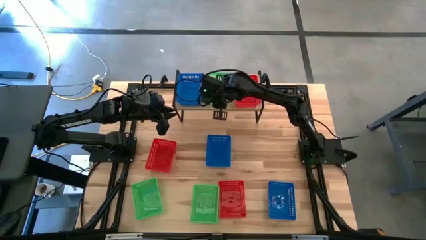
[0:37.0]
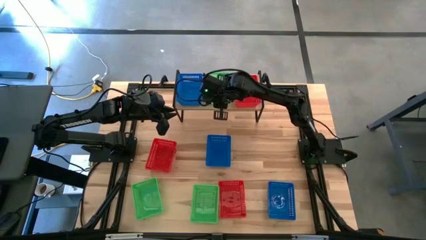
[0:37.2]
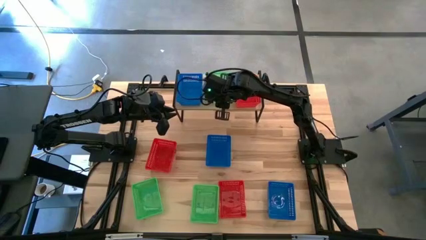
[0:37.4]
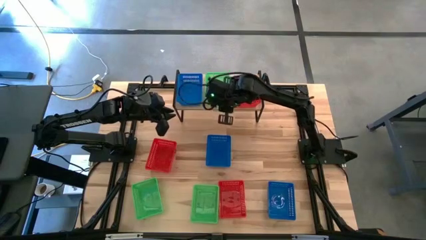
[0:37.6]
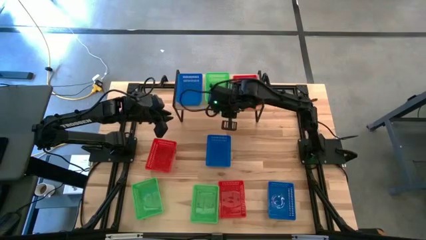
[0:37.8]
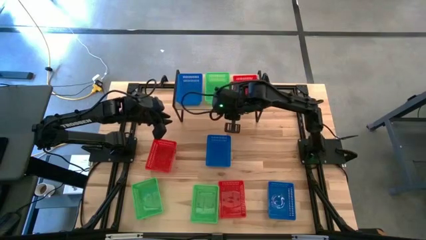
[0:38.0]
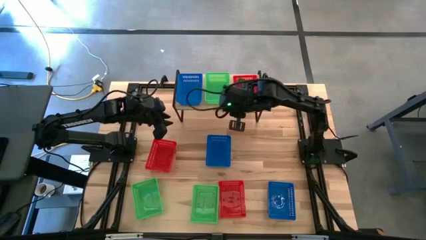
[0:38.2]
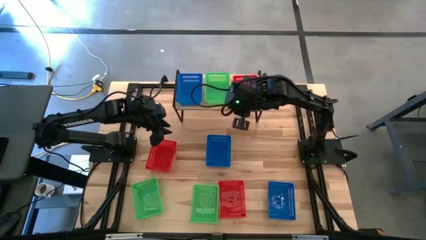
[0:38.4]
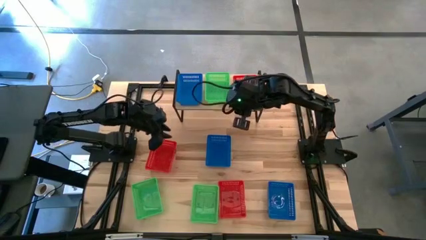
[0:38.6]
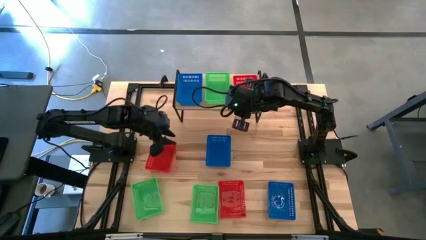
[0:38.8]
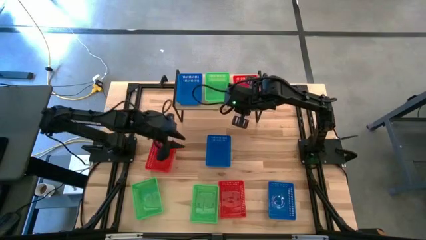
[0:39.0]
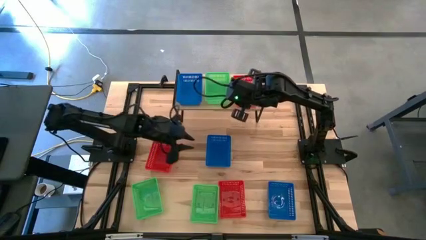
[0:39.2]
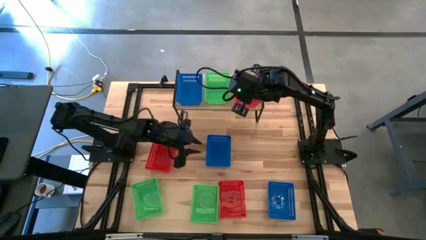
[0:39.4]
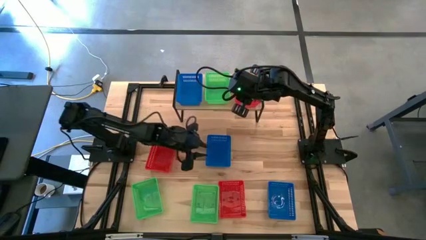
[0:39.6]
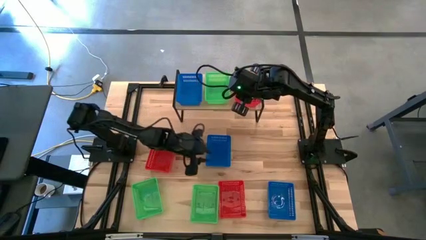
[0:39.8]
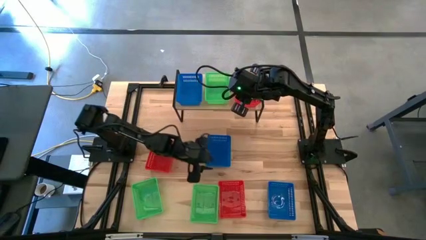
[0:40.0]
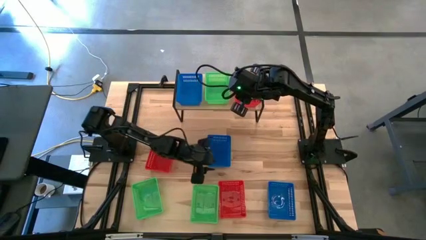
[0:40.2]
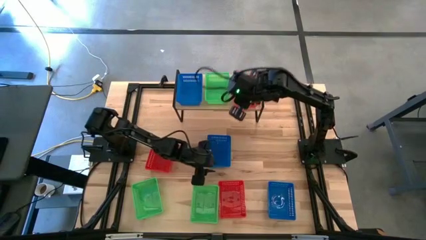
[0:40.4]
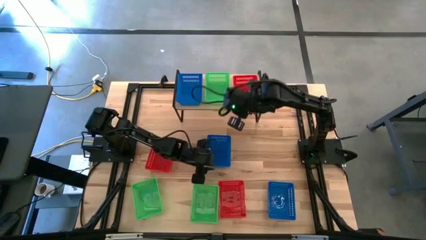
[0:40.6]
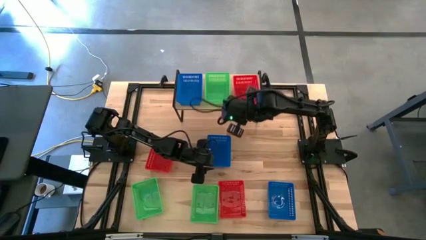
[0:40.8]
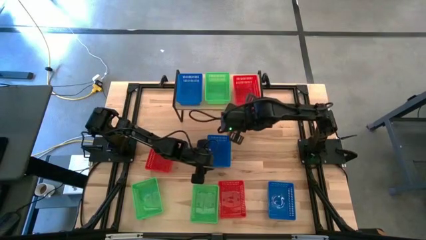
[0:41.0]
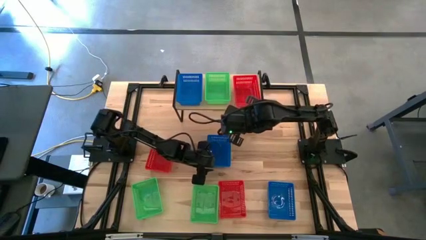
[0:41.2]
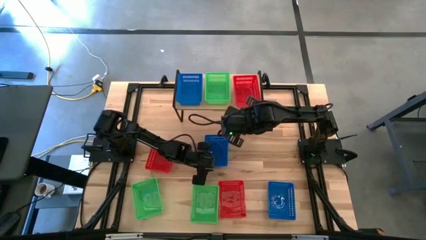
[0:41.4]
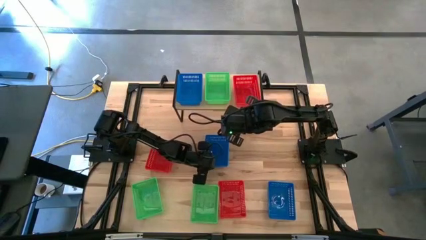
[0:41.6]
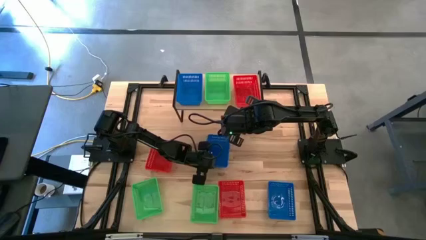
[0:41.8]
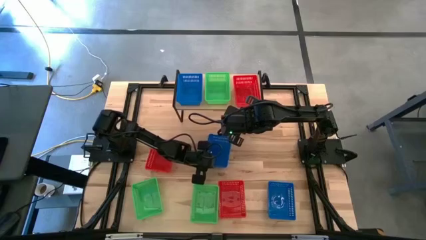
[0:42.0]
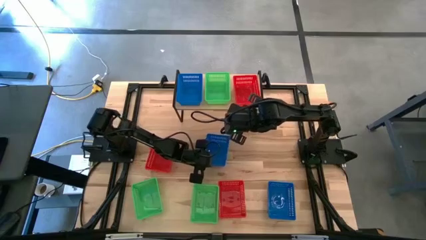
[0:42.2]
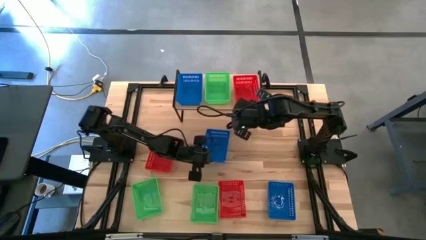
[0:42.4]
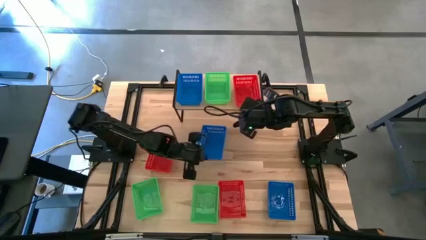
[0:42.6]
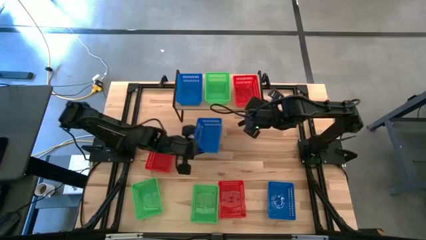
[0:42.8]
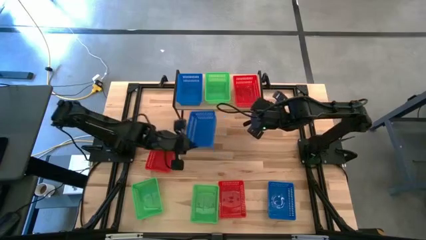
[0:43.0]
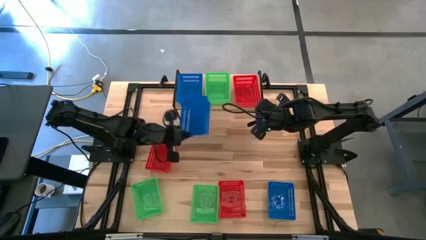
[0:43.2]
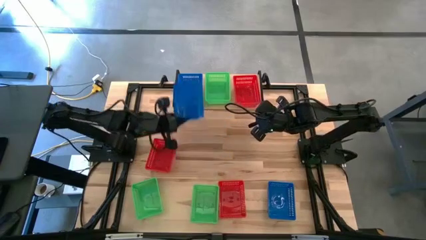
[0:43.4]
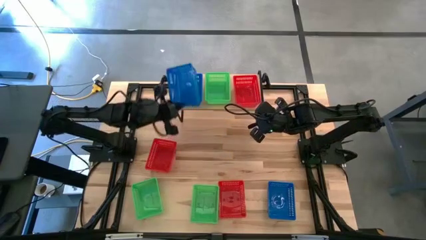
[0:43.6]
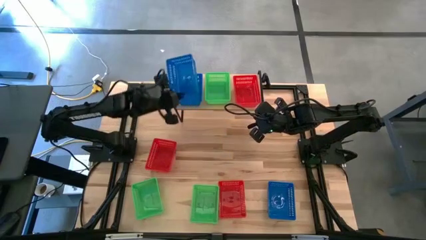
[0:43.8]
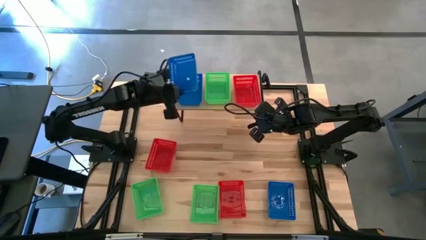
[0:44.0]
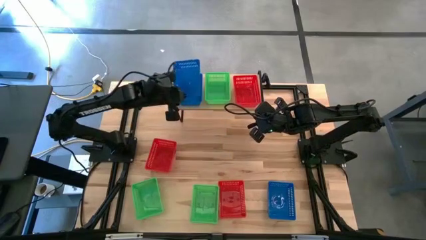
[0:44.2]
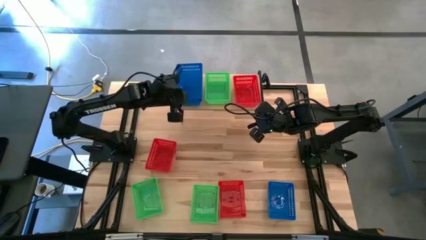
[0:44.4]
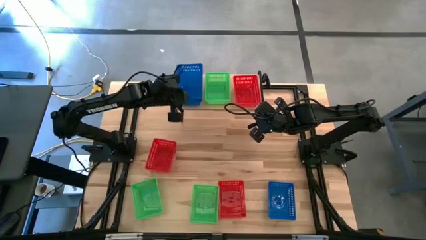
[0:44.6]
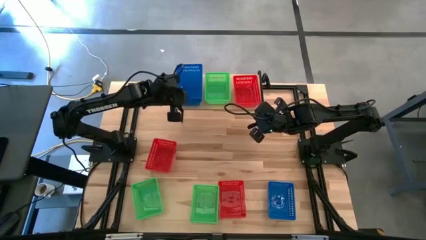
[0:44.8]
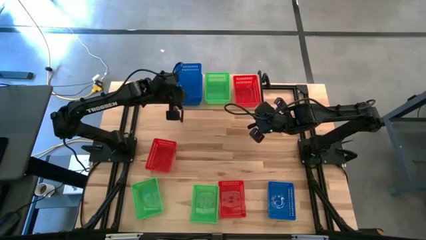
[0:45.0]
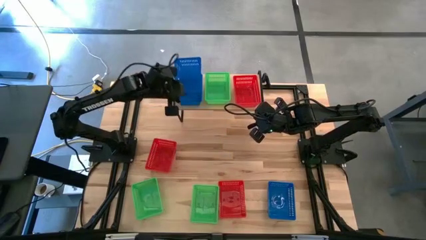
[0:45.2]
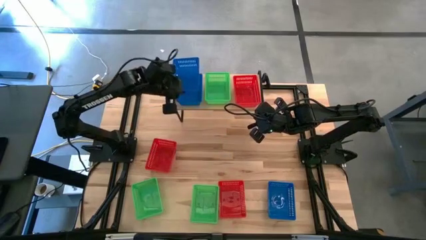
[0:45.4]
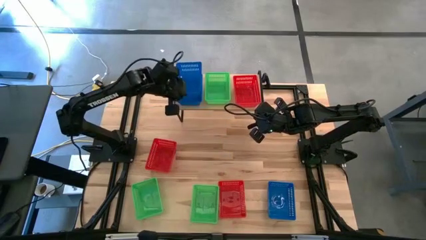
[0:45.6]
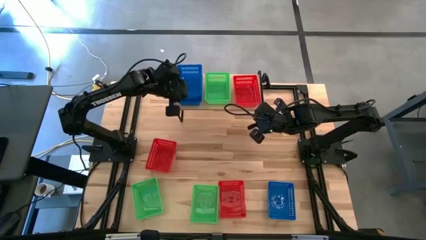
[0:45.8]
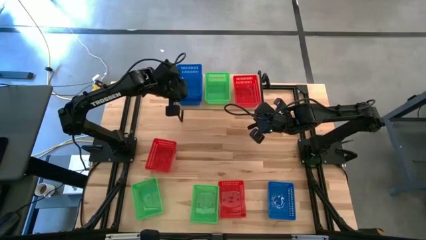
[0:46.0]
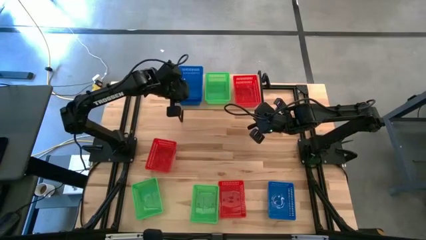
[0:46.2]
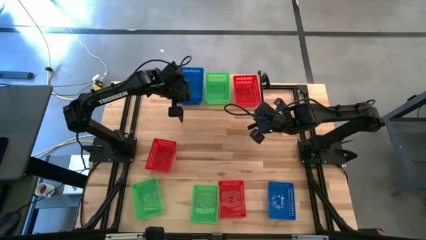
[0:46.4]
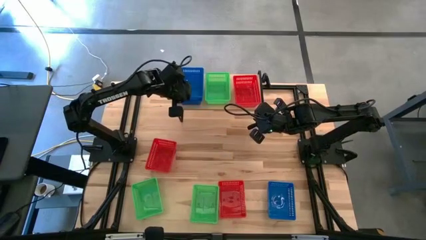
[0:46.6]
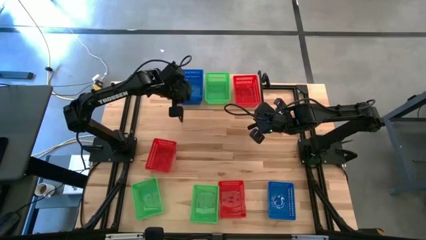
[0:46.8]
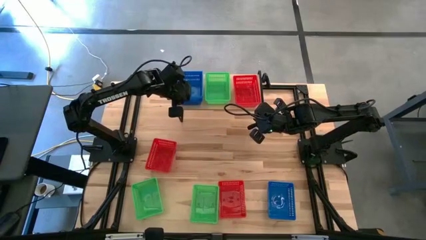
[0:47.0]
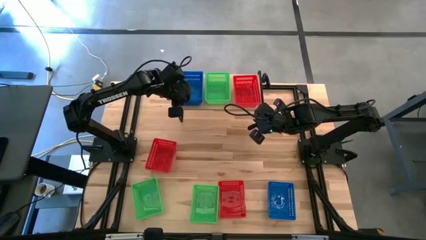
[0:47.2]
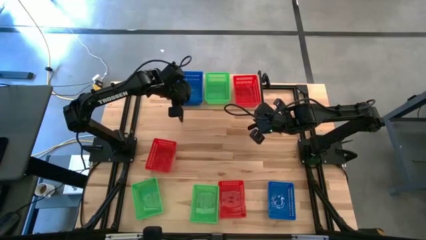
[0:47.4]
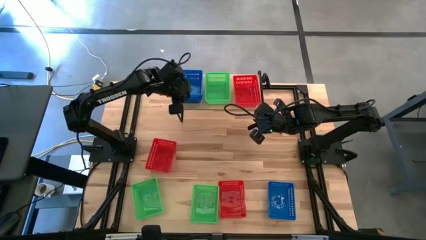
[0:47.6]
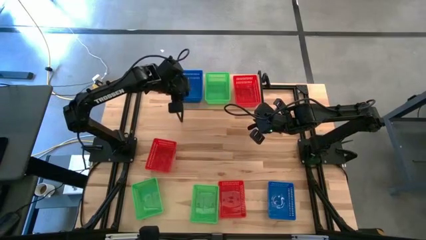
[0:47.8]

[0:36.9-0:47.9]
Task: Stack baskets on shelf by color
Stack the top blue bin on top of the blue bin on the shelf

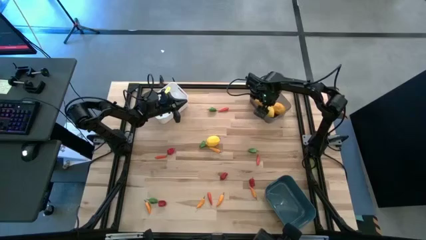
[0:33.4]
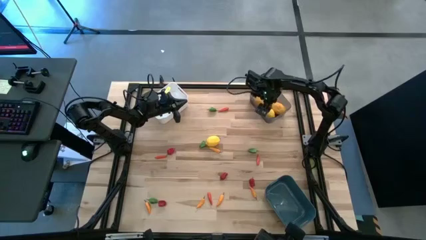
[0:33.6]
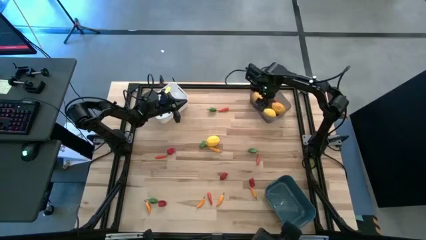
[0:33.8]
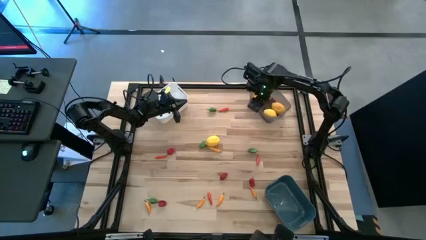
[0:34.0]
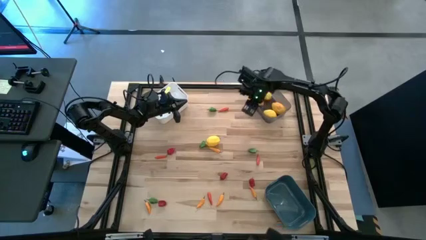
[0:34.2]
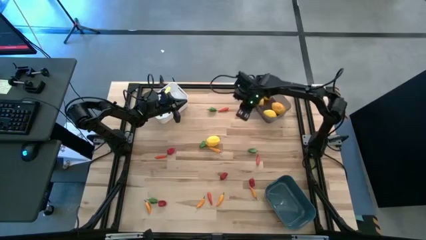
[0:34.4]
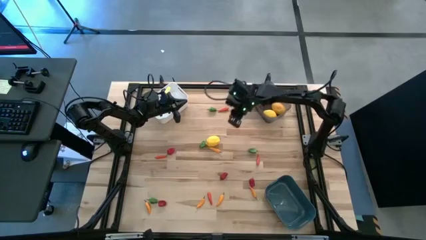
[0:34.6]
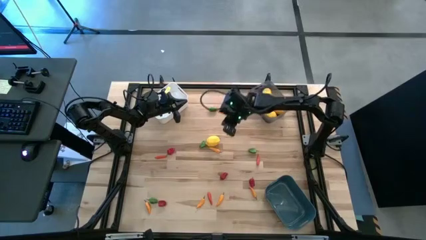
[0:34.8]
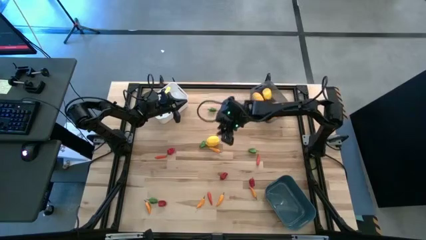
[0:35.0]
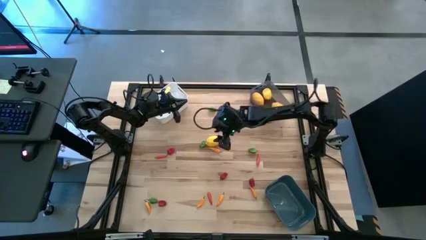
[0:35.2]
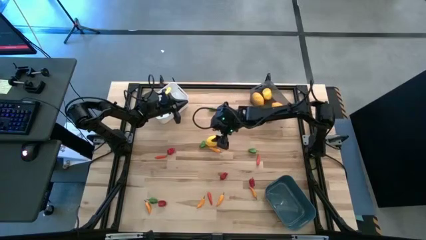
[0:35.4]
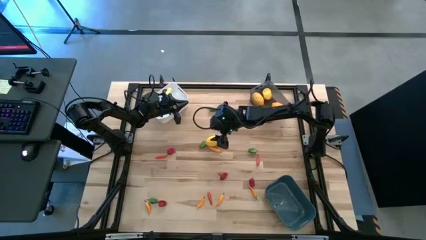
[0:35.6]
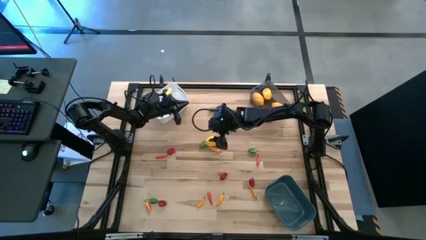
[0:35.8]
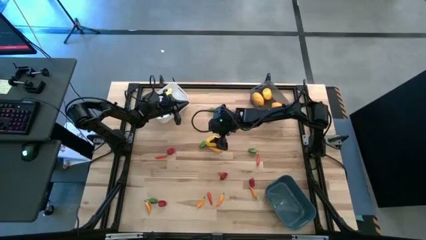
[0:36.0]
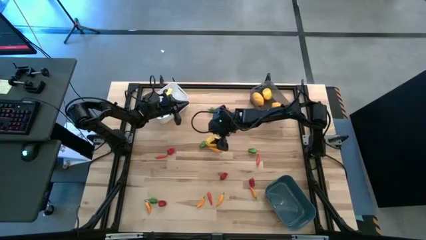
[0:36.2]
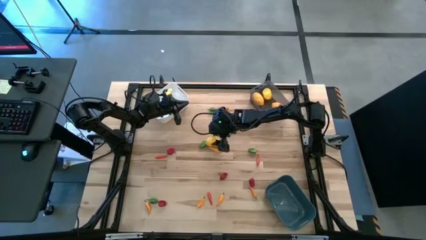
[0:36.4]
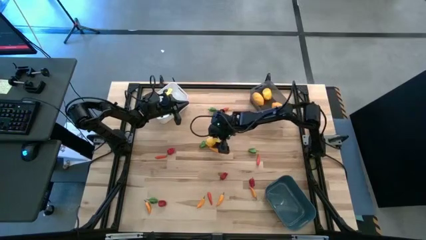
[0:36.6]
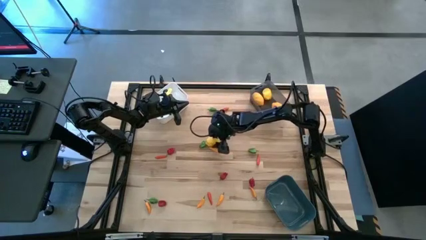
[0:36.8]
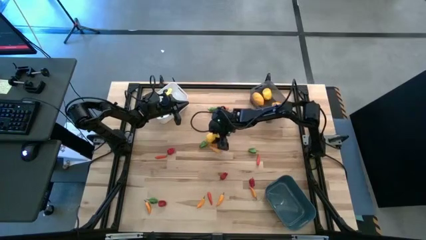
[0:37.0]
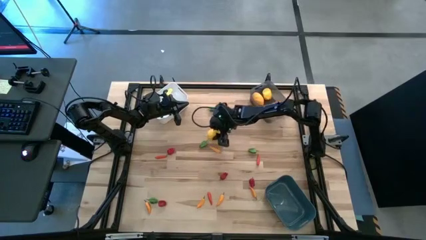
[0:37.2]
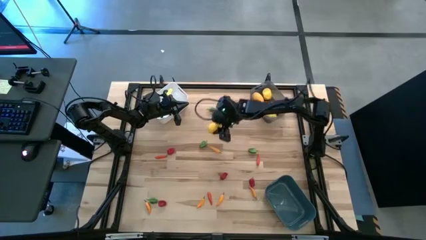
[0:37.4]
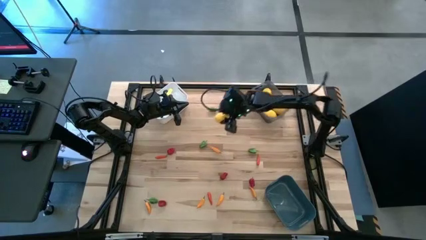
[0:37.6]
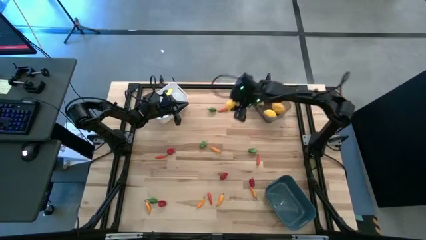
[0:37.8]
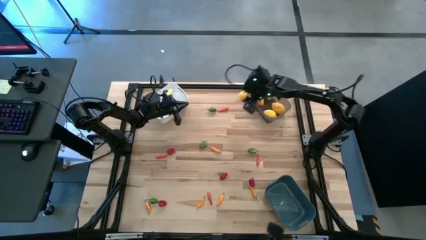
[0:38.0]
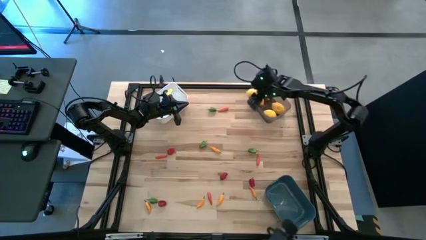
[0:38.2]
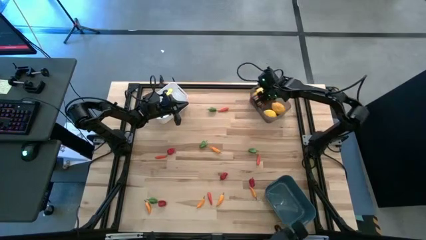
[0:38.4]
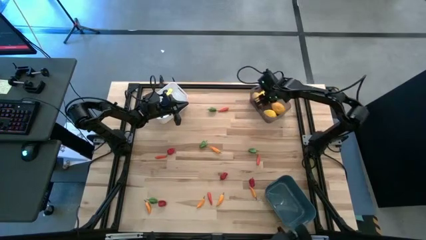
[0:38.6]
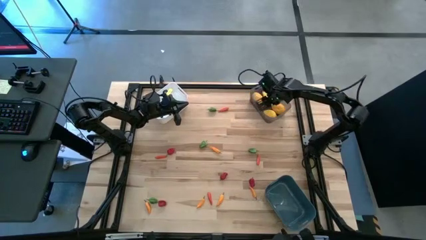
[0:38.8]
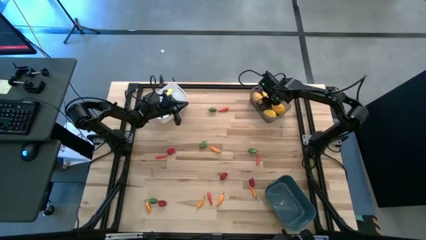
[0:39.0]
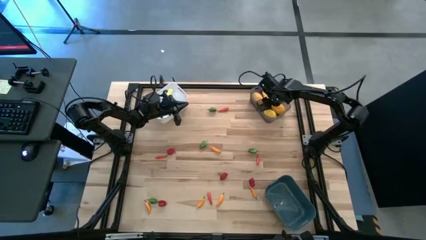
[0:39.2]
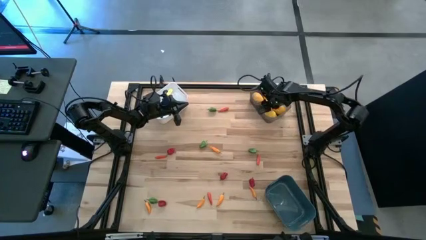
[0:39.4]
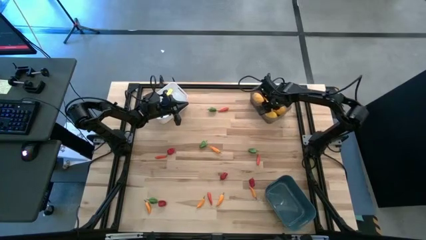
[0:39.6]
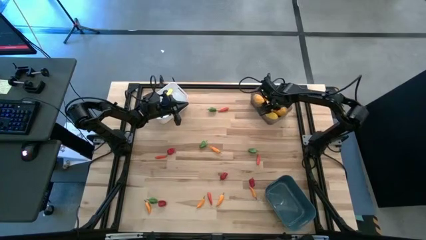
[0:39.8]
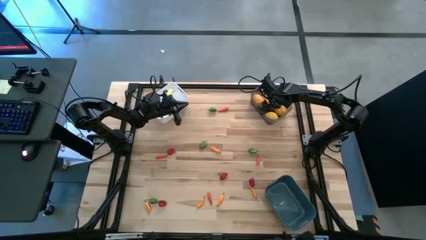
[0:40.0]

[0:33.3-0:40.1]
Task: Sort produce into baskets
Put the lemon into the black bin
